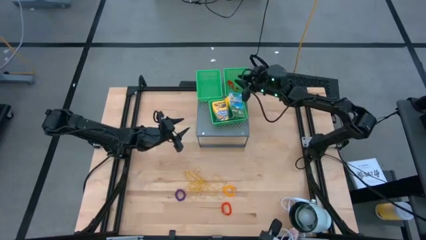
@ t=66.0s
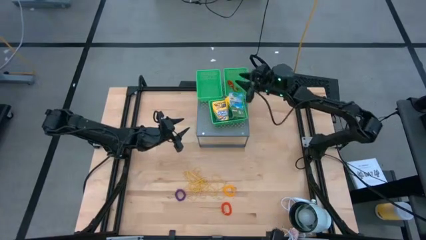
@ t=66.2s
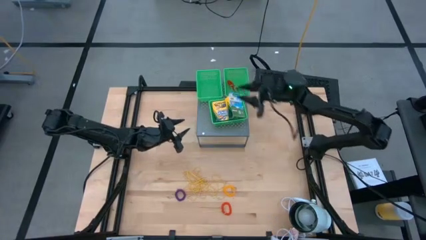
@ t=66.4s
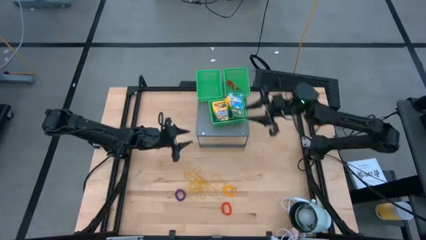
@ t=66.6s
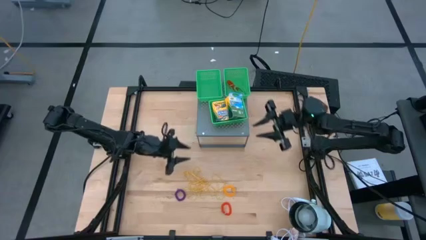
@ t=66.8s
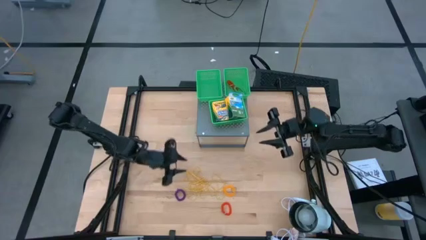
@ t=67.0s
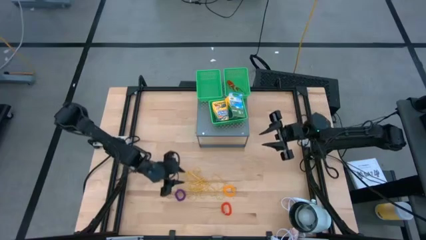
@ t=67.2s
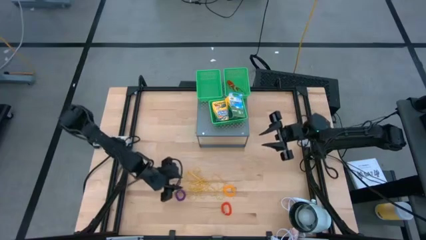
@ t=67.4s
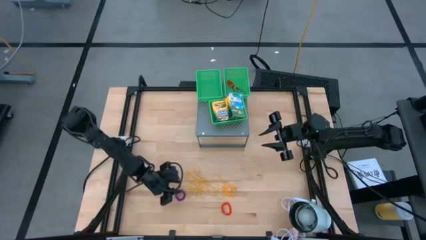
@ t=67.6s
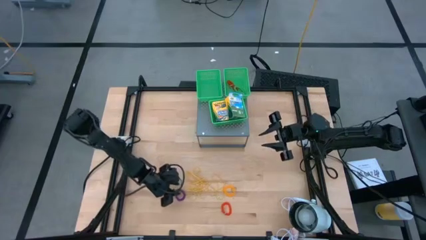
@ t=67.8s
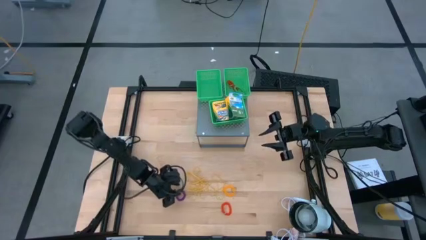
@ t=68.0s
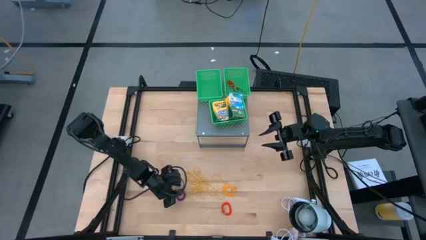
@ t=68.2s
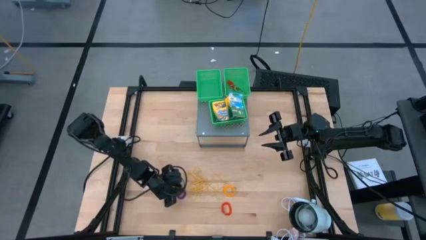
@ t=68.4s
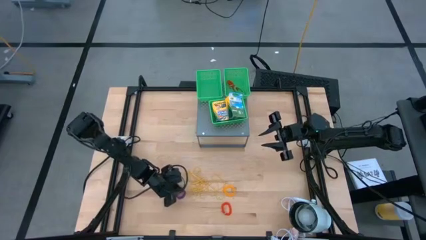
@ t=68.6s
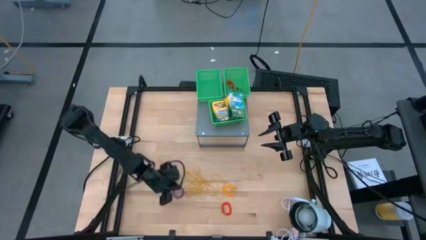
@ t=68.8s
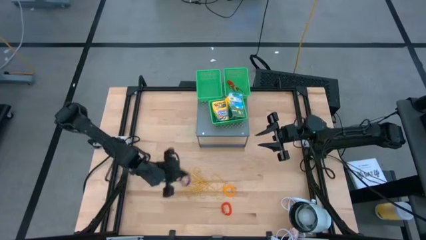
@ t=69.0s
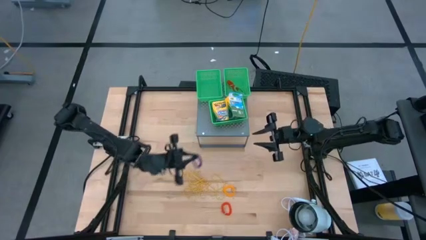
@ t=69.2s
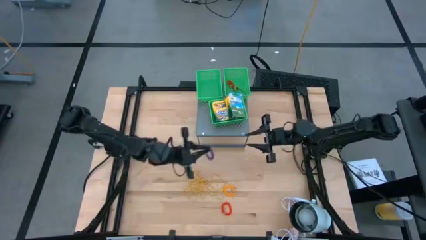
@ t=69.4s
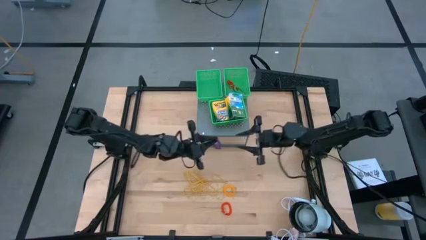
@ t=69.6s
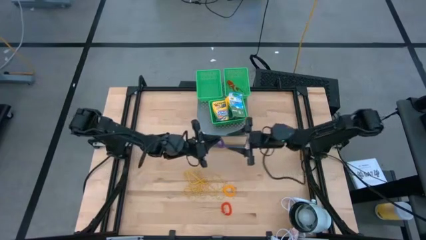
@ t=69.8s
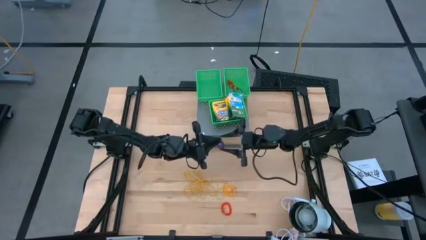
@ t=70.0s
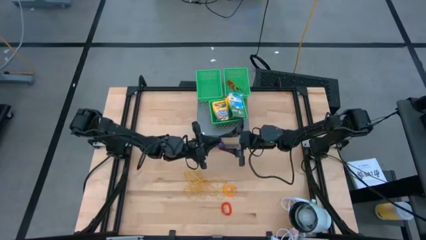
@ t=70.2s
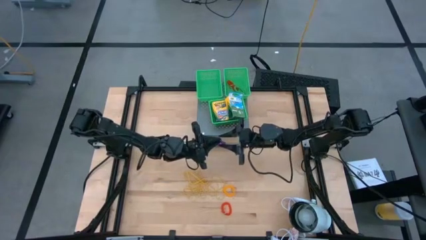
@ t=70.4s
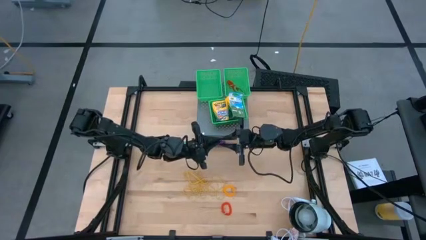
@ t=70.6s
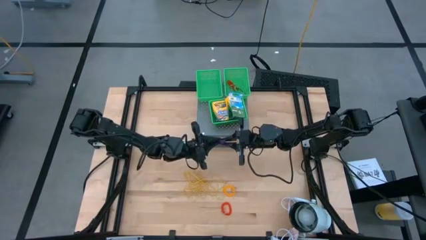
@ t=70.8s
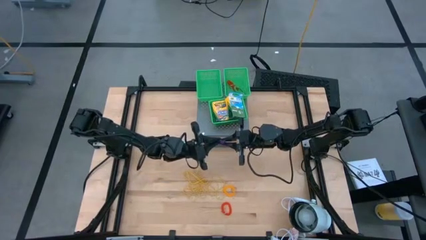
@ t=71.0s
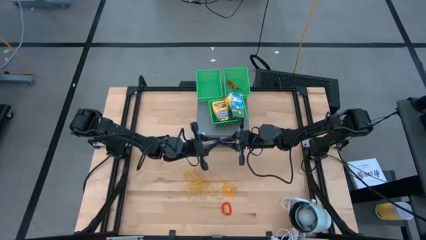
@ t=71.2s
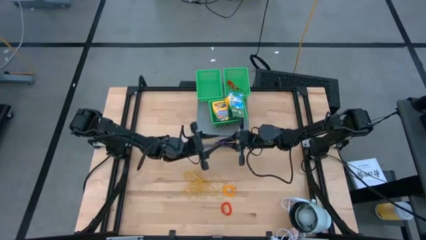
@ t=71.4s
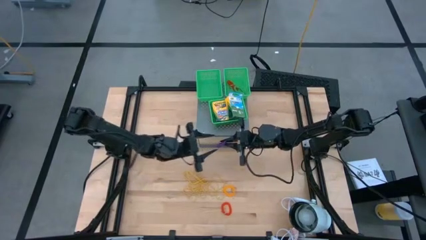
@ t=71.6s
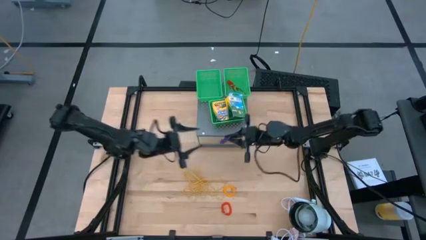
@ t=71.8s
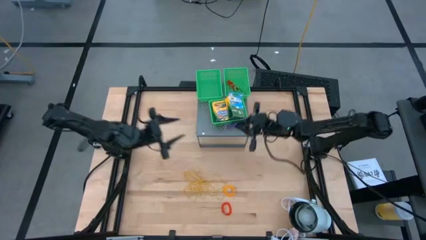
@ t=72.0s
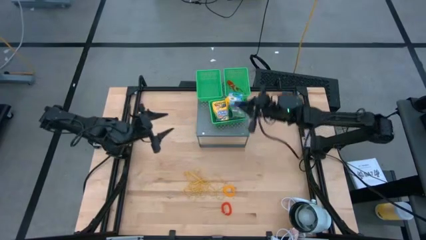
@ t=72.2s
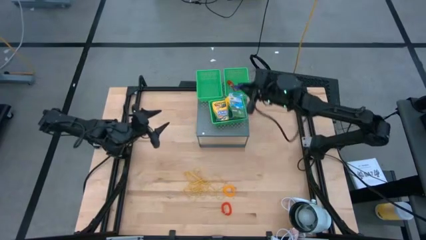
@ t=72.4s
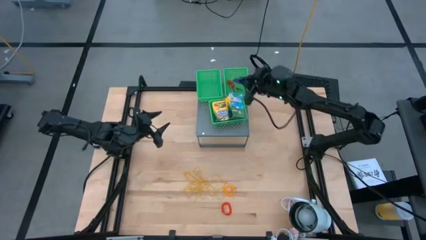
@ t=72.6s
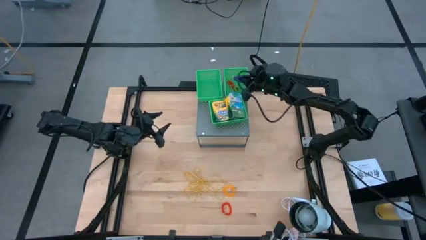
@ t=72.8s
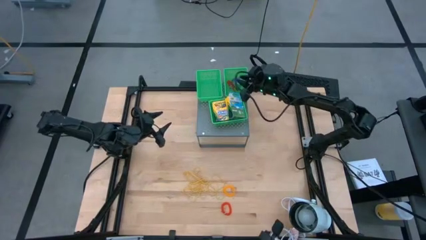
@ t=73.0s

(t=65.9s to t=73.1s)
Task: Pick & Place Office Desk Supplies
Put the violet spring keychain into the right green bin on the shelf

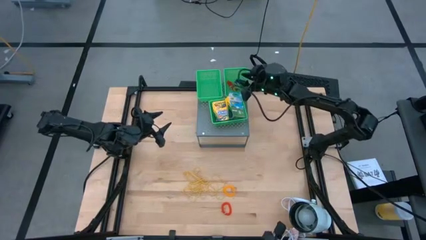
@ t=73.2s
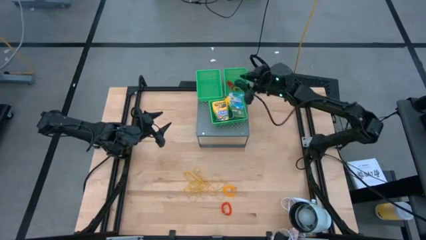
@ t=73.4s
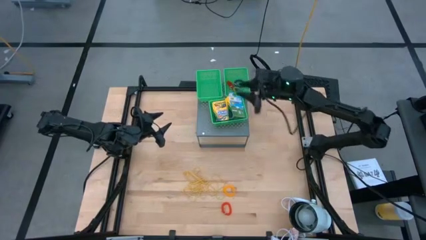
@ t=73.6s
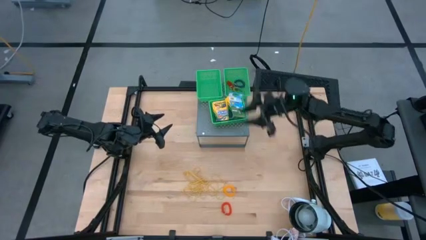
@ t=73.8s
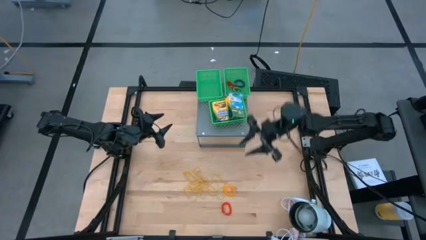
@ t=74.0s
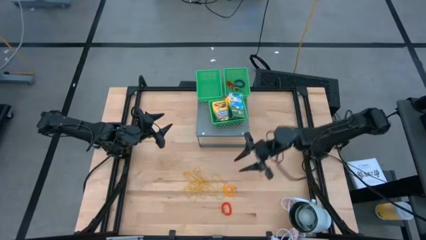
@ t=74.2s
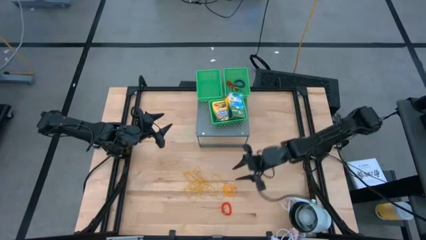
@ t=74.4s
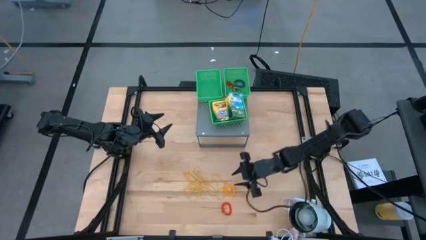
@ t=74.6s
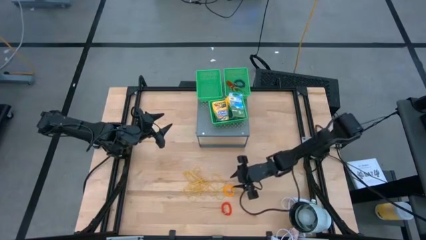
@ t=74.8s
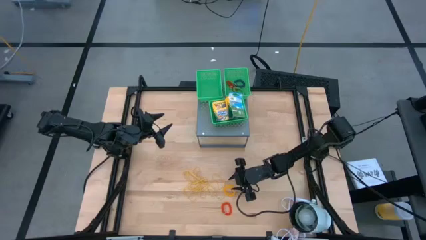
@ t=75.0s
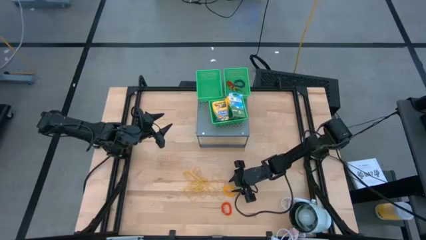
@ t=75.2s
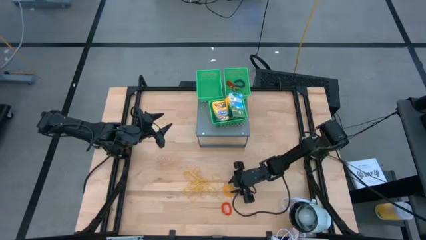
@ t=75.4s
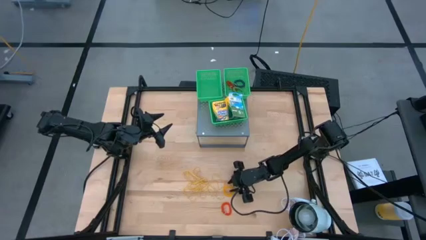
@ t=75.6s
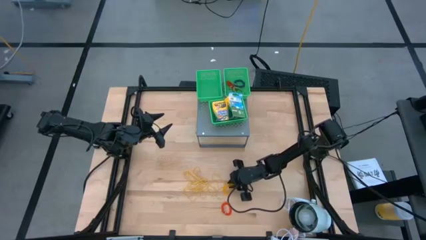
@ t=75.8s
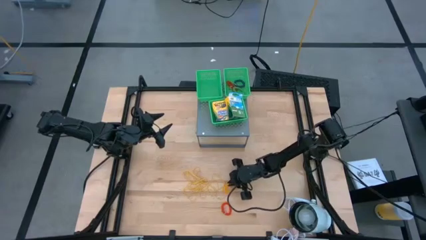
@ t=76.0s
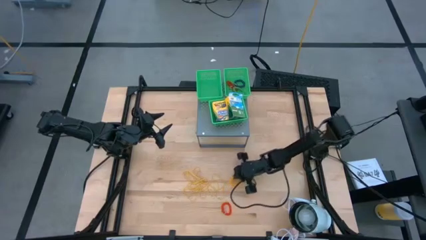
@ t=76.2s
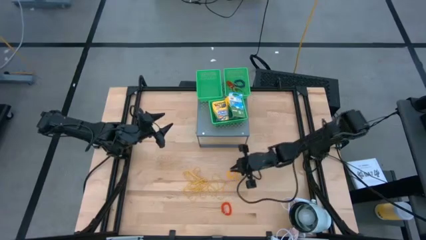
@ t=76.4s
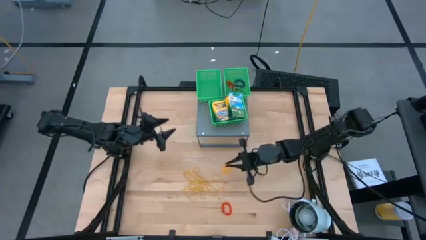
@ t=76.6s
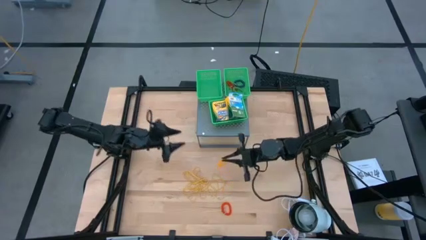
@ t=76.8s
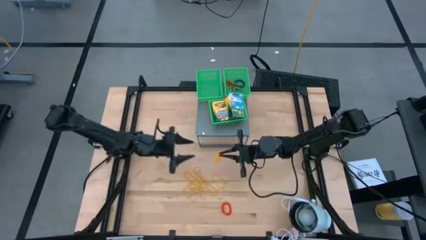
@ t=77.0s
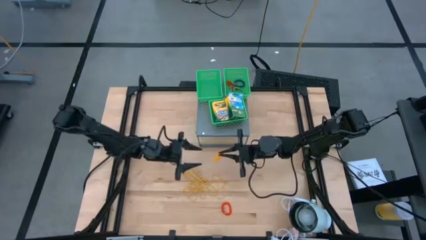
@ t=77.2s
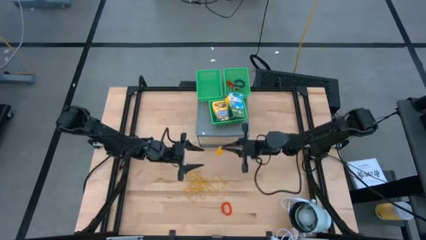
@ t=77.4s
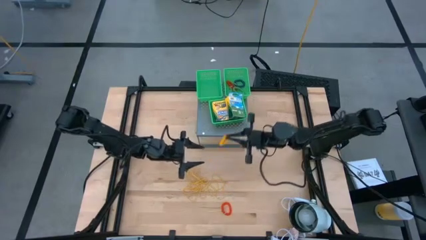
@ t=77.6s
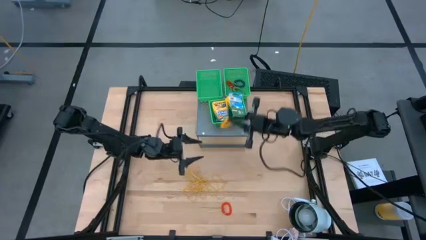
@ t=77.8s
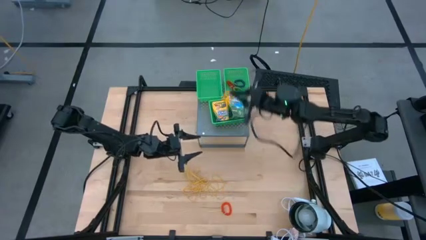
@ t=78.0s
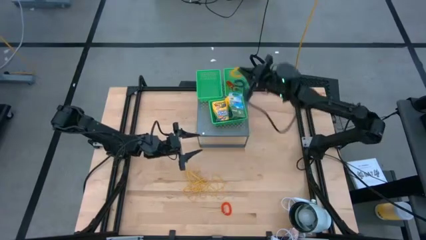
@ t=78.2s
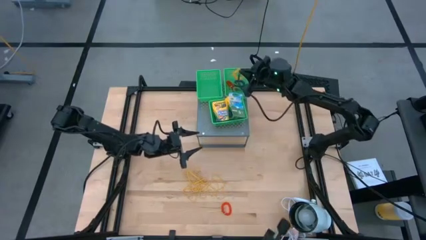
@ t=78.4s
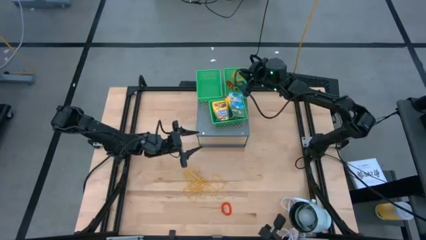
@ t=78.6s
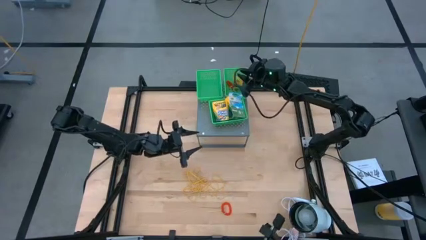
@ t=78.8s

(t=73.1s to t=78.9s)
Put the yellow spring keychain into the right green bin on the shelf
